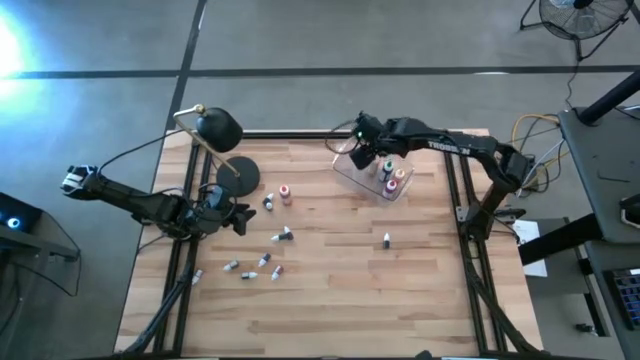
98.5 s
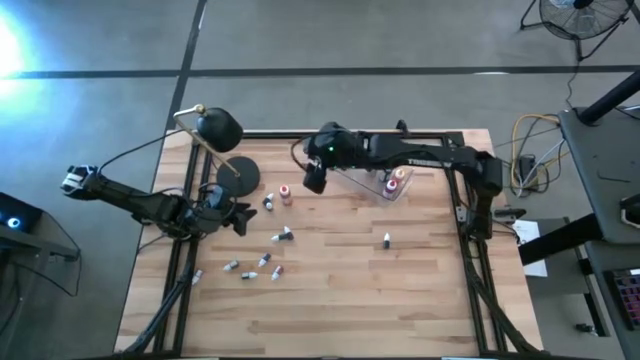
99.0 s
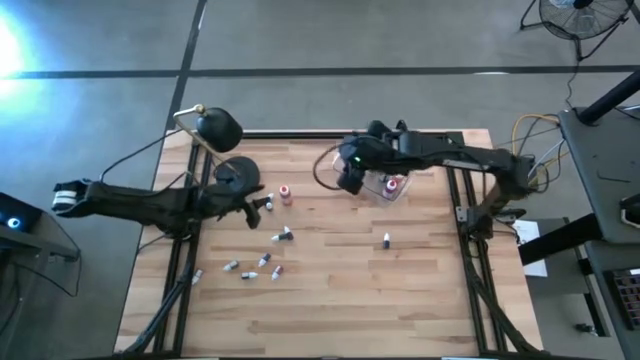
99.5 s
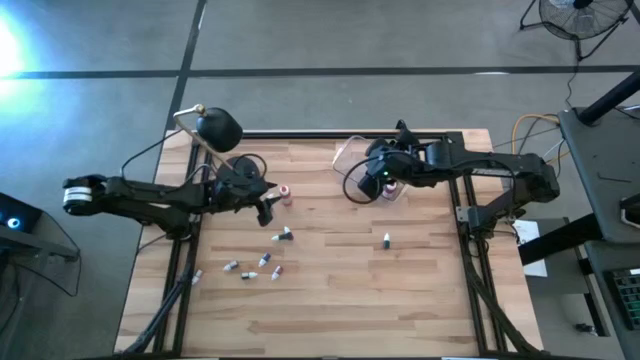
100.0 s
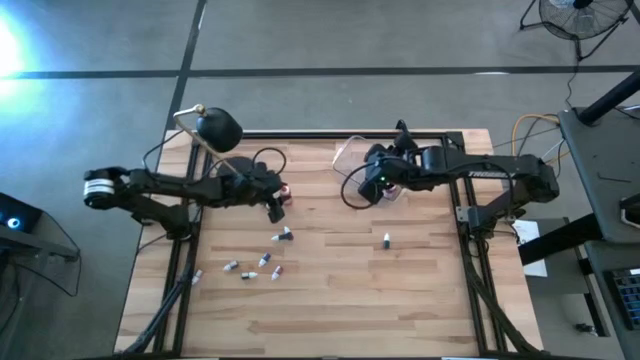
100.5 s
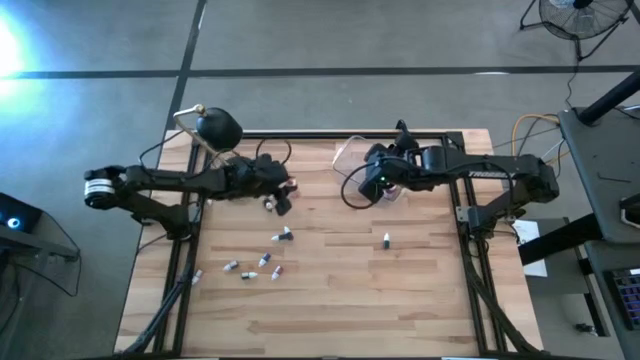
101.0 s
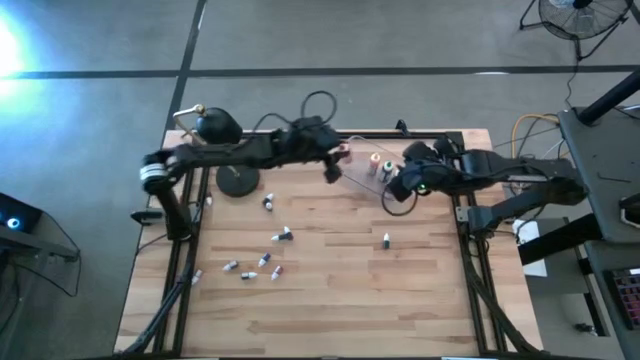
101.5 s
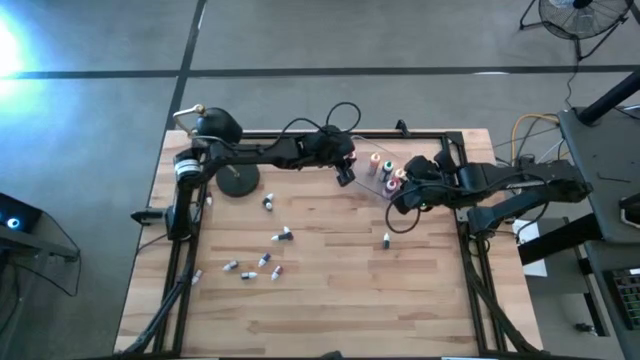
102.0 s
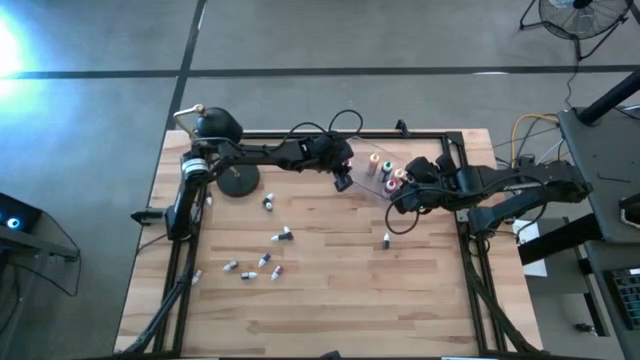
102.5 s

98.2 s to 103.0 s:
Task: Pick & Place food coloring
Put the large orange food coloring bottle into the transparent bin

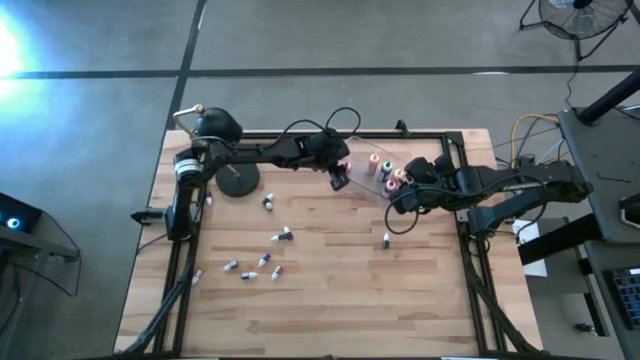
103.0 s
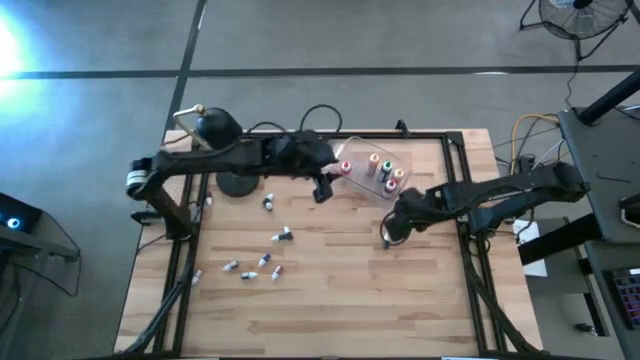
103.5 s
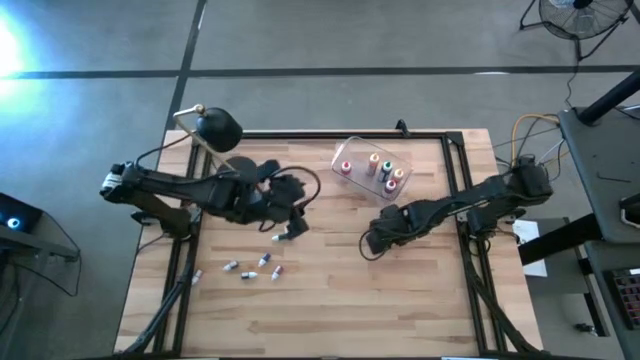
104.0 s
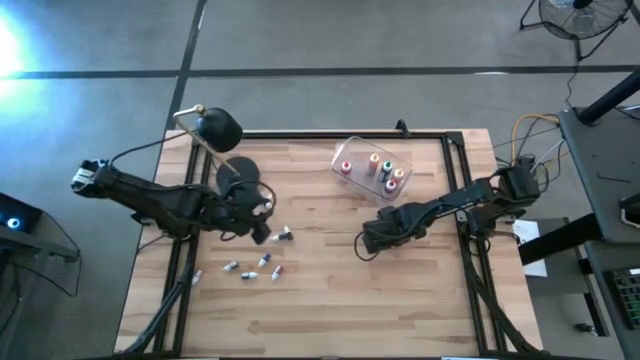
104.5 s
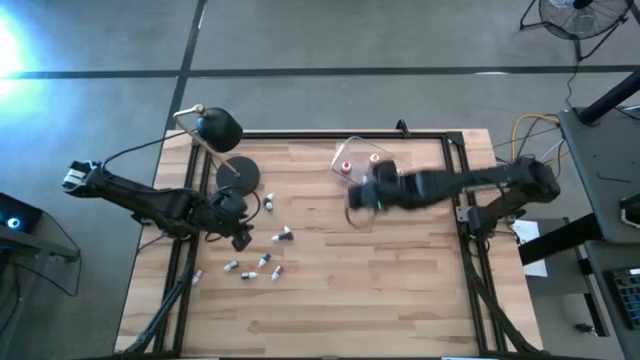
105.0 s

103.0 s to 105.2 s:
Put the small right green food coloring bottle into the transparent bin

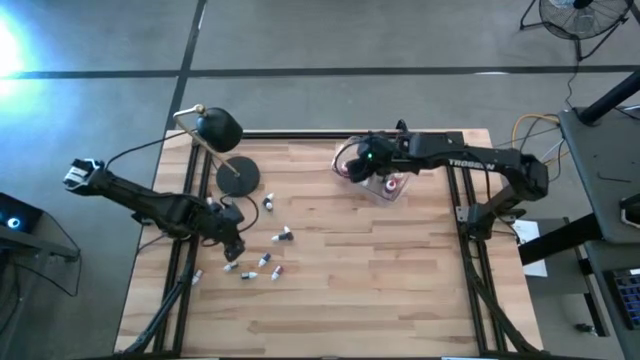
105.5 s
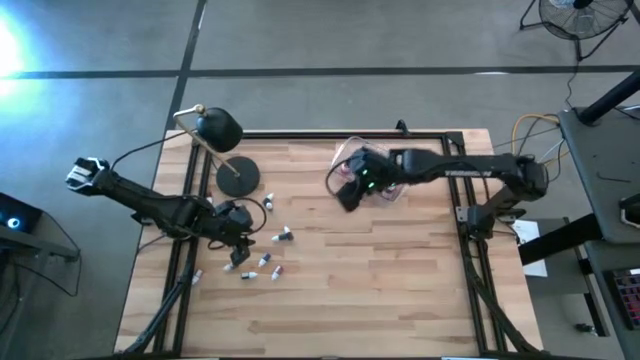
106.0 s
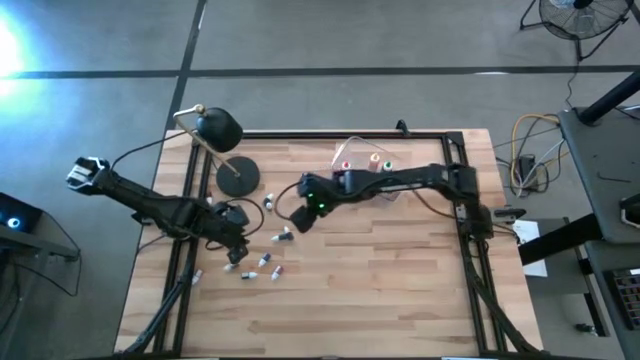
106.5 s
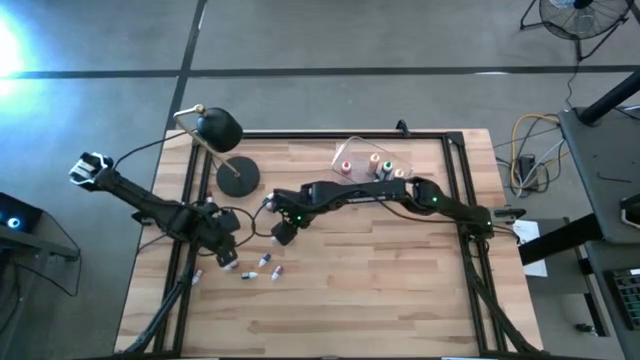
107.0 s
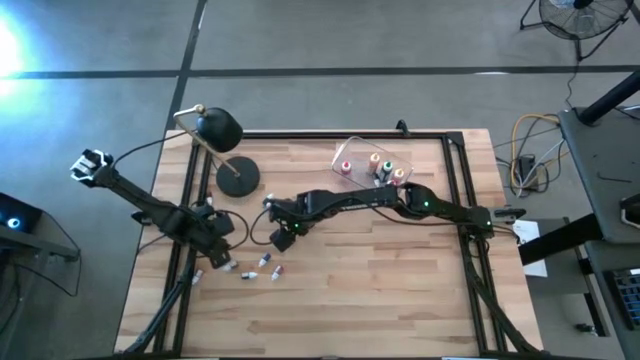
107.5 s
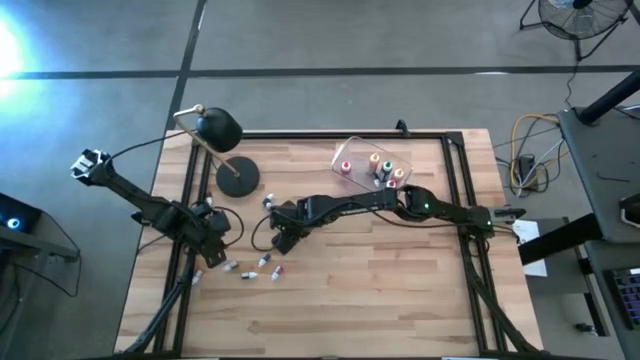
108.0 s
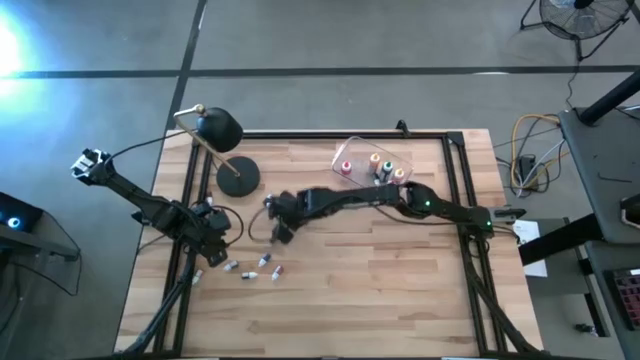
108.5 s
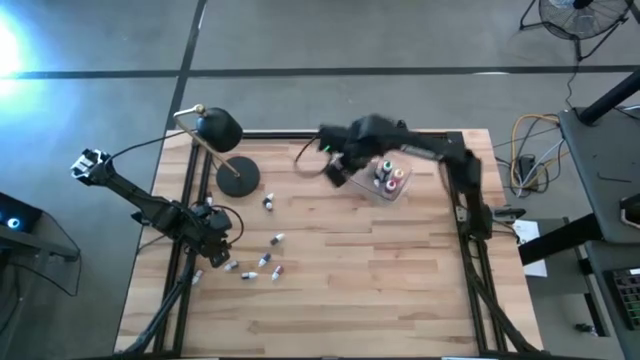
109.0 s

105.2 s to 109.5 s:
Put the small top red food coloring bottle into the transparent bin

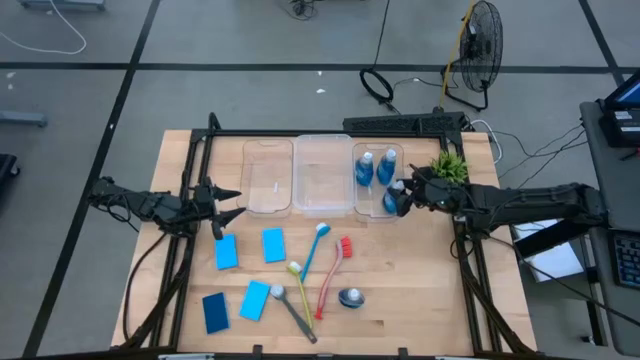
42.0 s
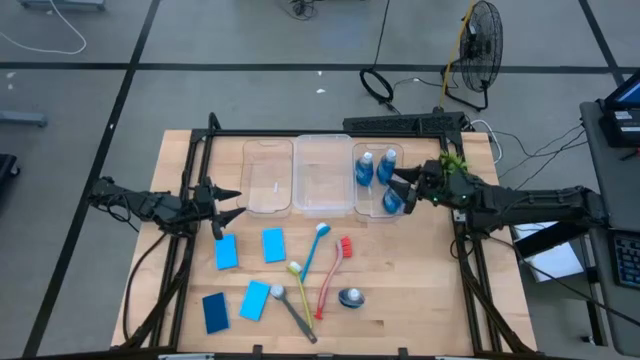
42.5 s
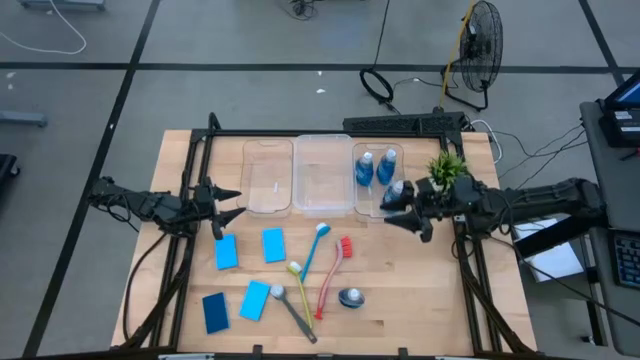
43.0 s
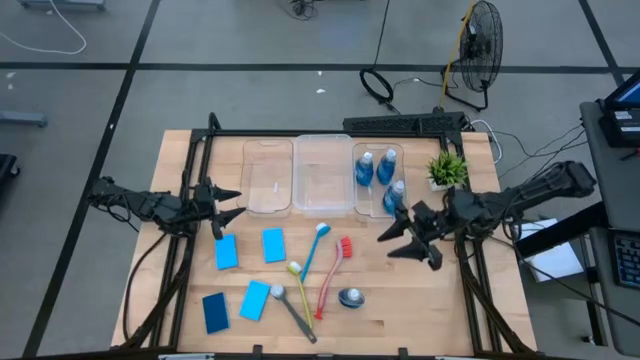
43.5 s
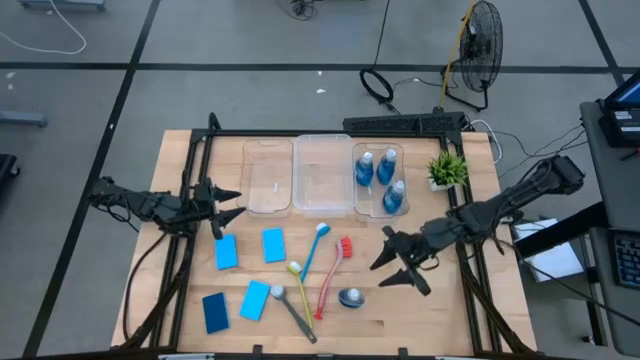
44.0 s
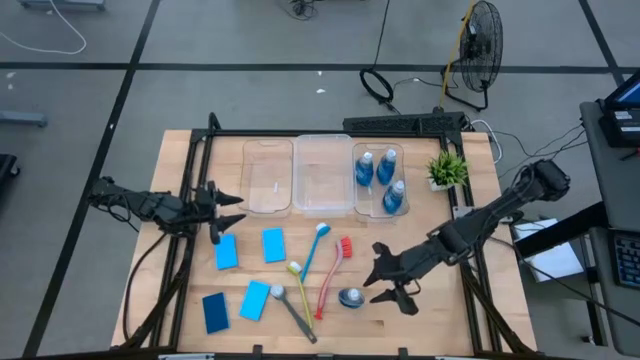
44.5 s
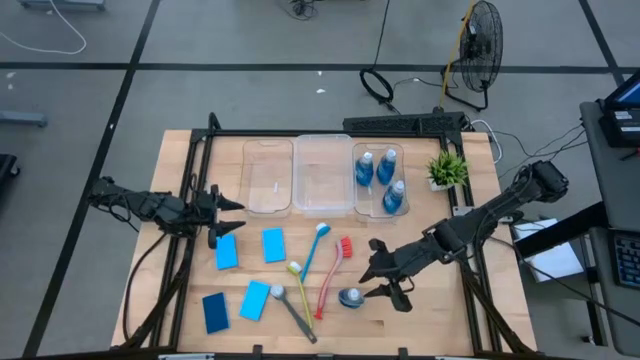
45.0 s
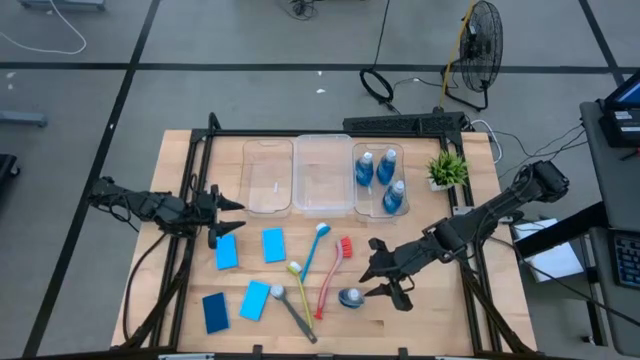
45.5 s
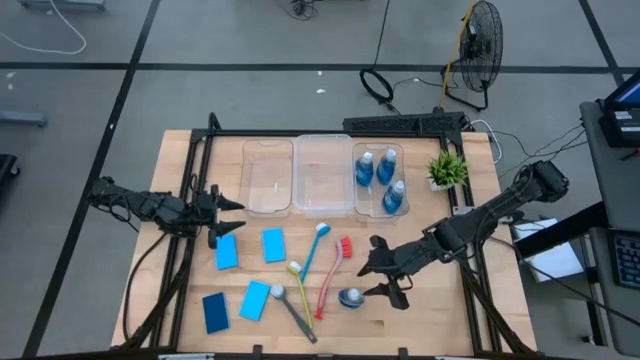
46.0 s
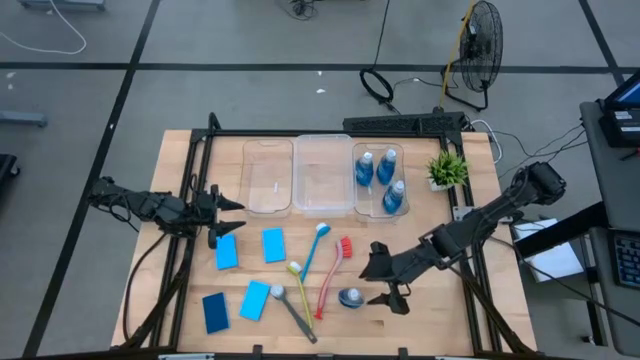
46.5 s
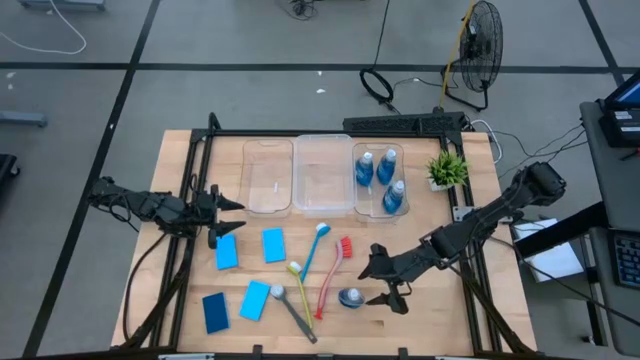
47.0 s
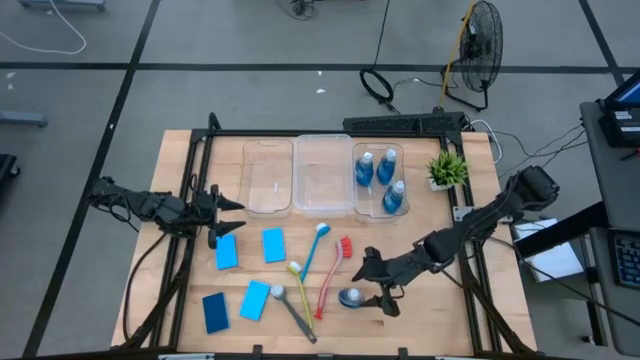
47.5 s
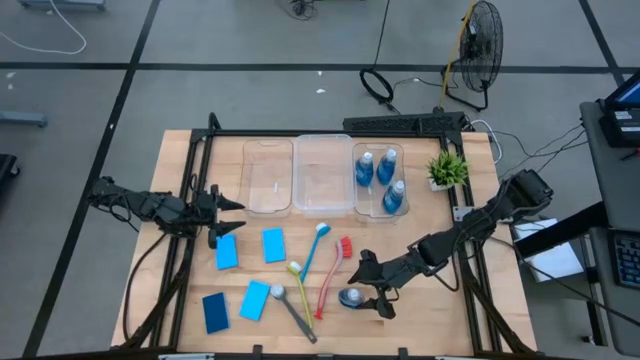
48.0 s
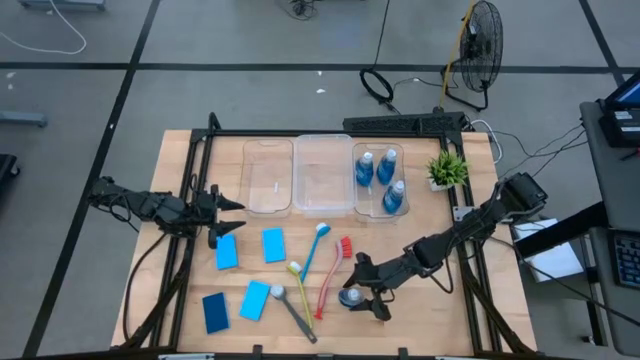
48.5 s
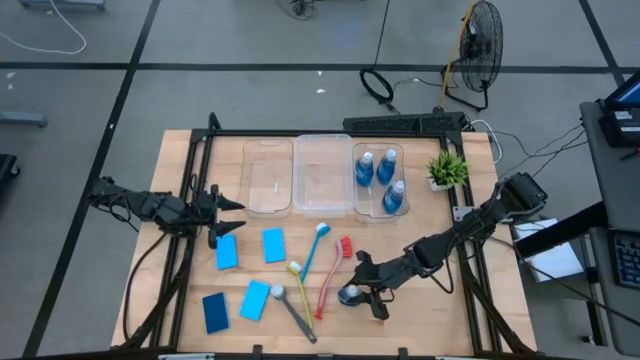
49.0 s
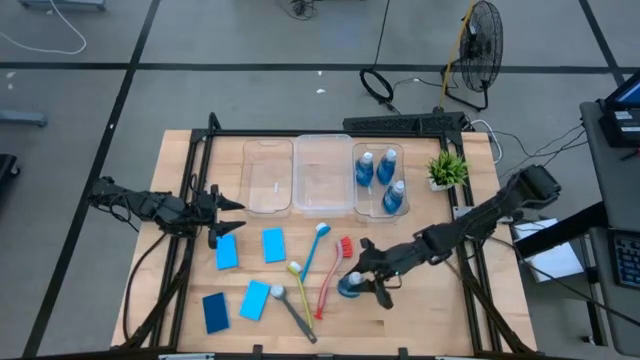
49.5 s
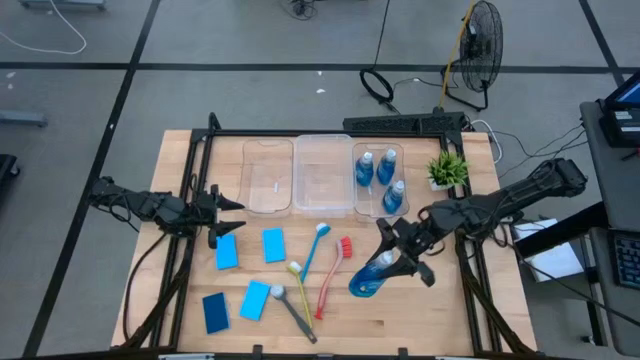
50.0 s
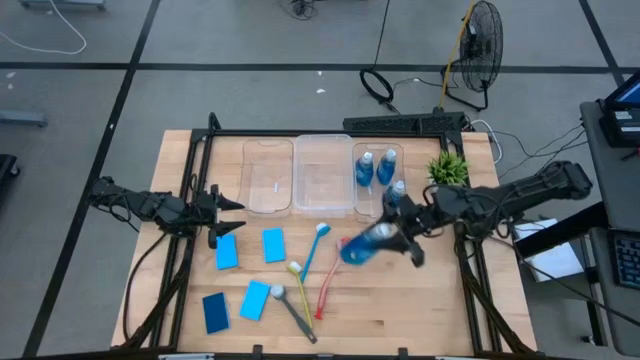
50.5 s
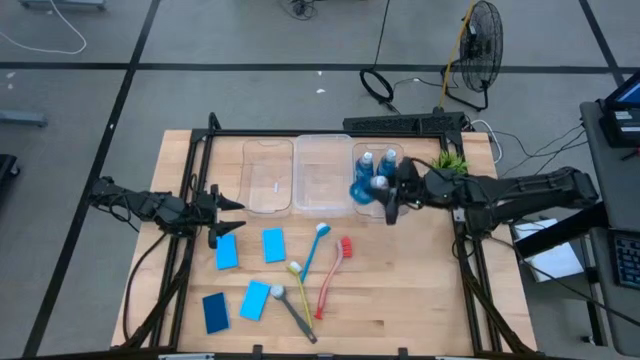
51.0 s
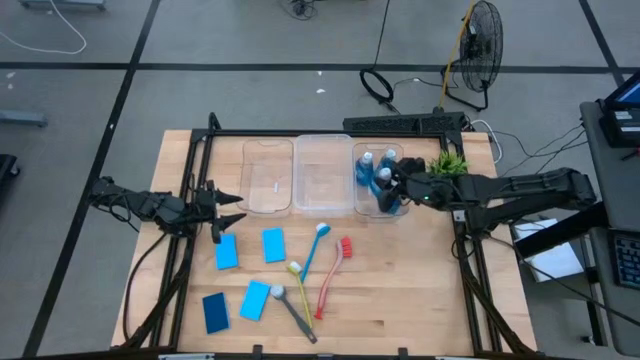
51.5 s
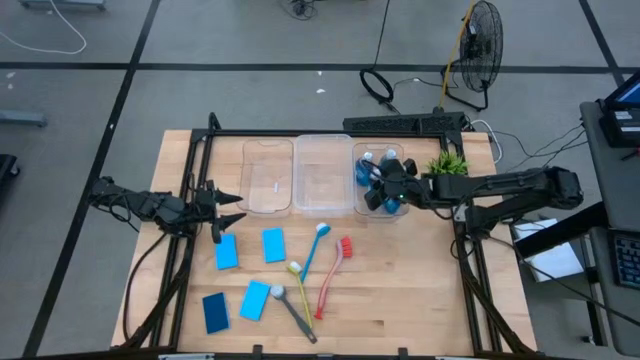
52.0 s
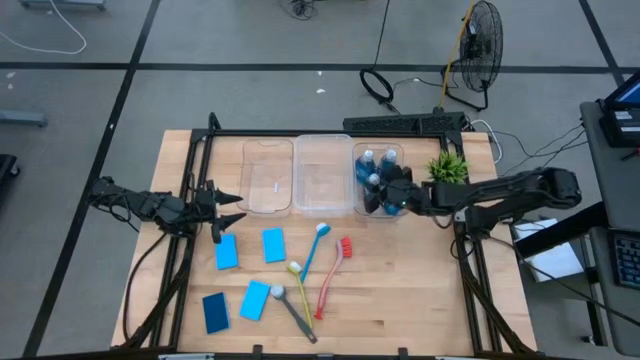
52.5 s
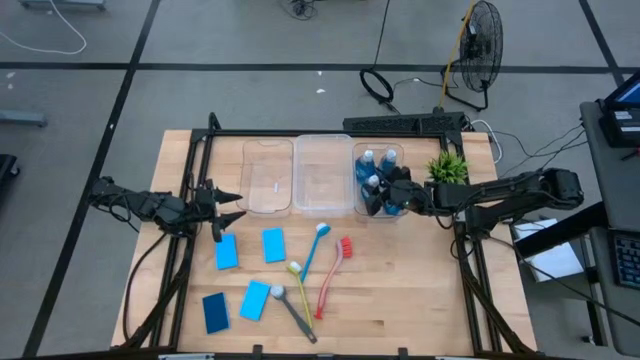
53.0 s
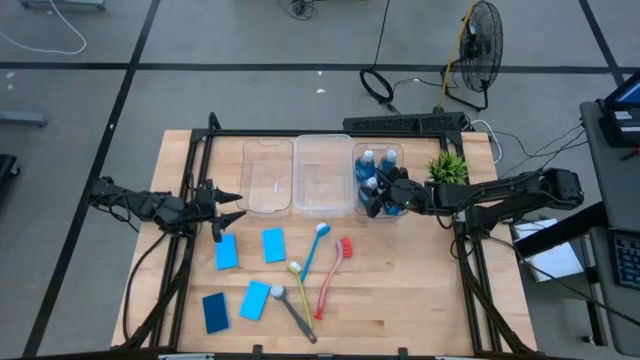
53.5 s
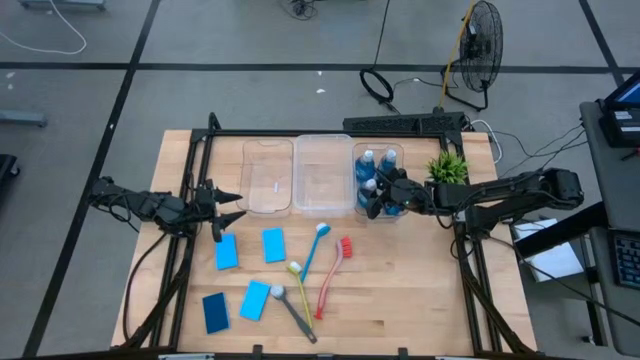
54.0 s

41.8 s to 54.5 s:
Task: Pick & Place Kitchen Sink Supplies
Put the blue dishwashing liquid bottle into the right transparent bin
